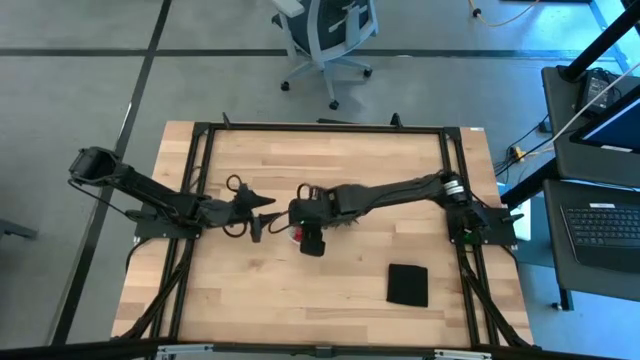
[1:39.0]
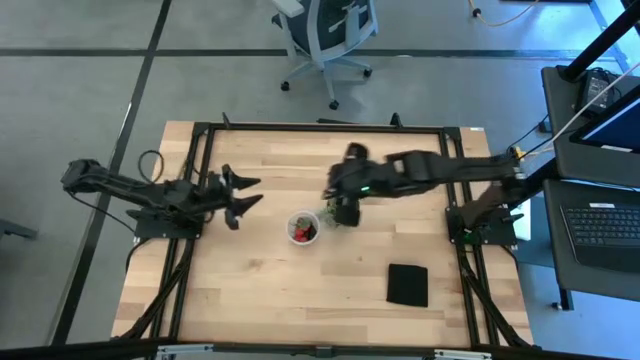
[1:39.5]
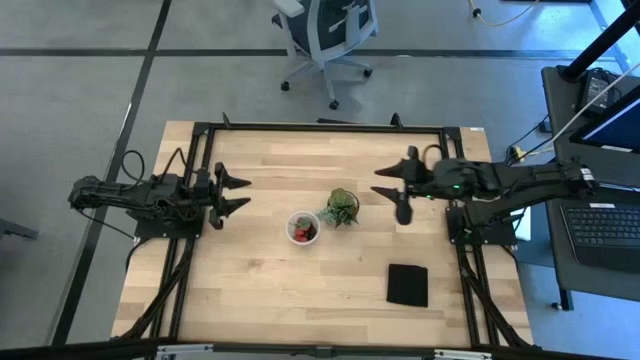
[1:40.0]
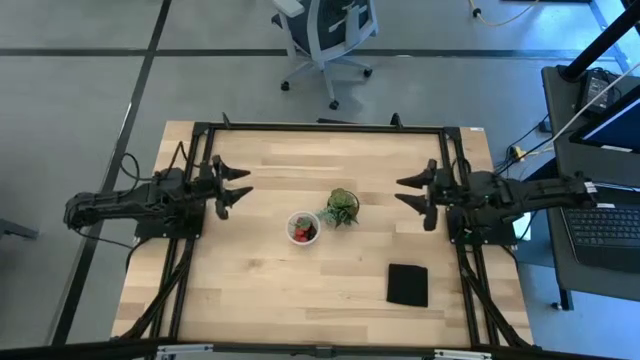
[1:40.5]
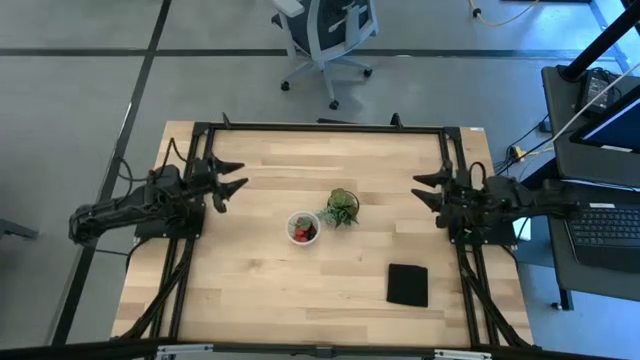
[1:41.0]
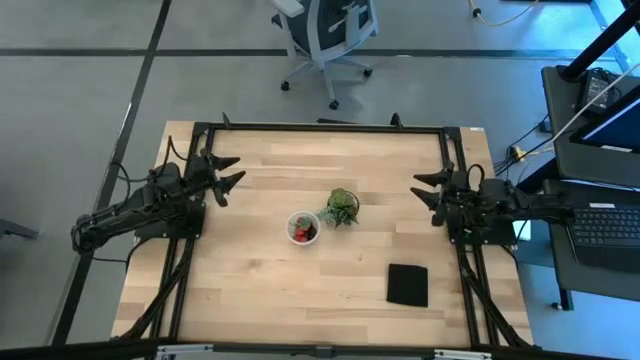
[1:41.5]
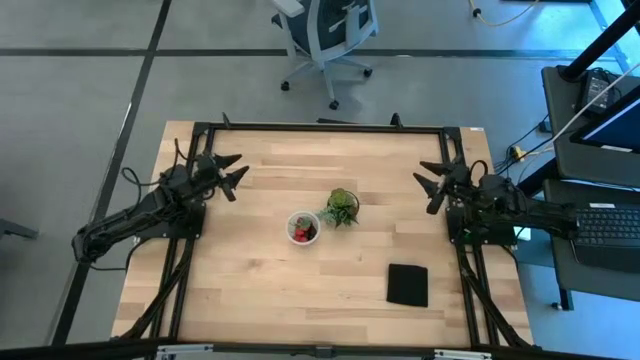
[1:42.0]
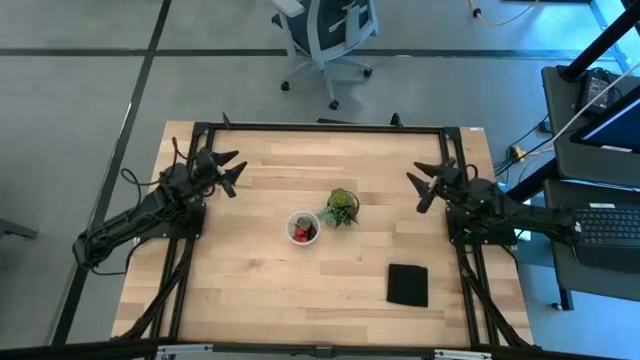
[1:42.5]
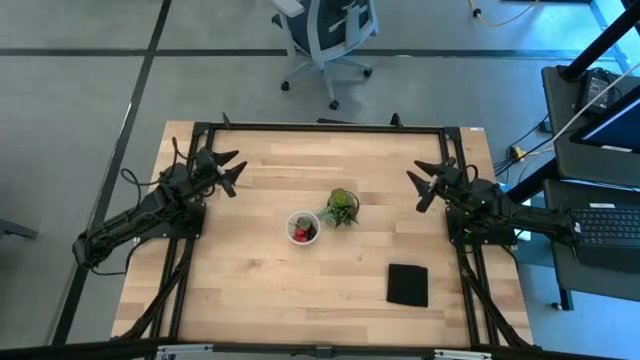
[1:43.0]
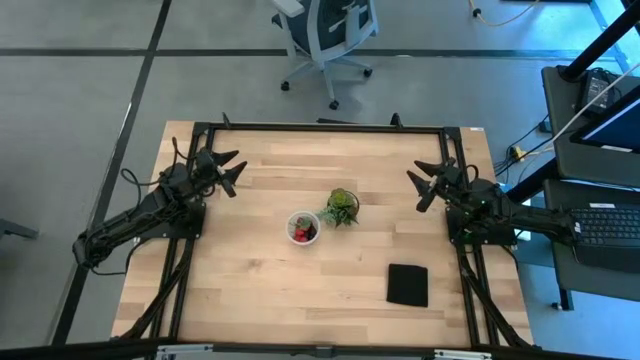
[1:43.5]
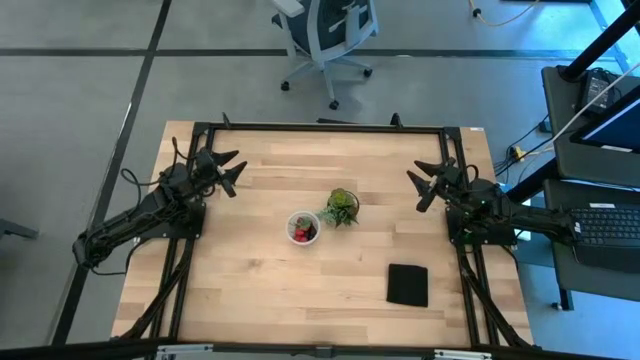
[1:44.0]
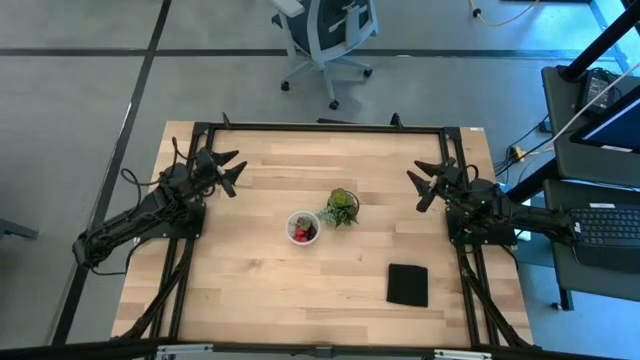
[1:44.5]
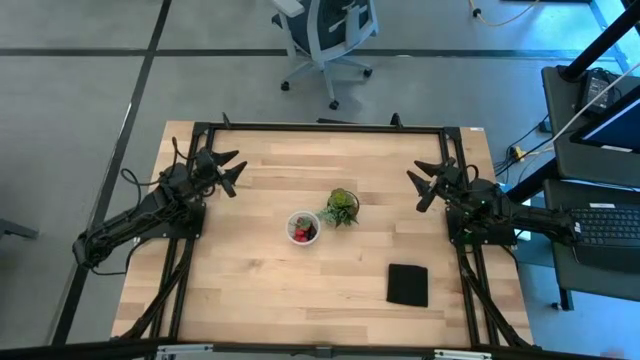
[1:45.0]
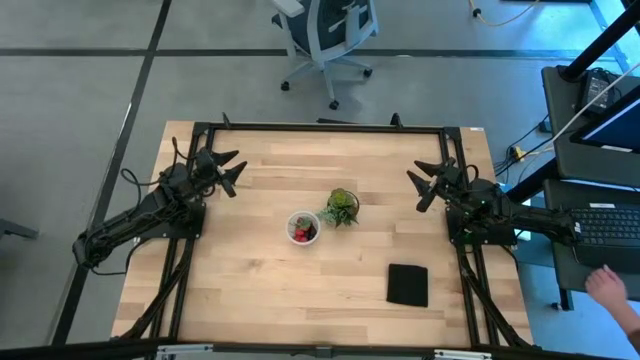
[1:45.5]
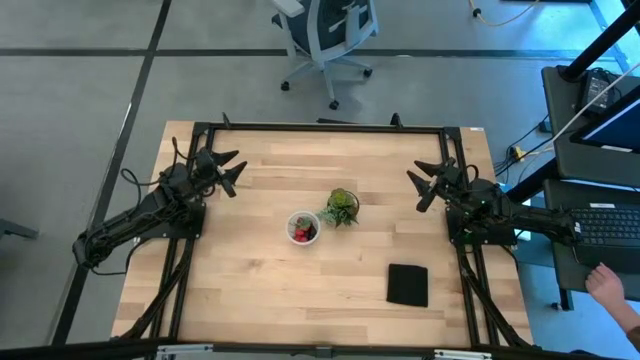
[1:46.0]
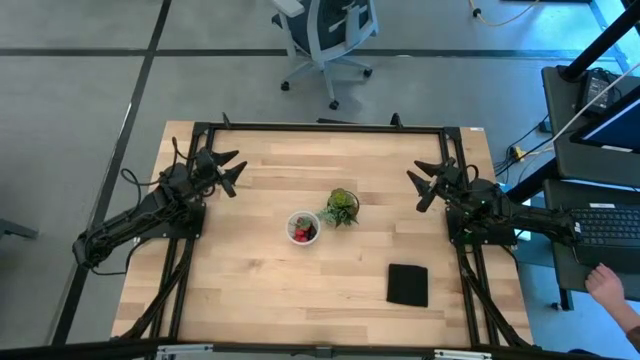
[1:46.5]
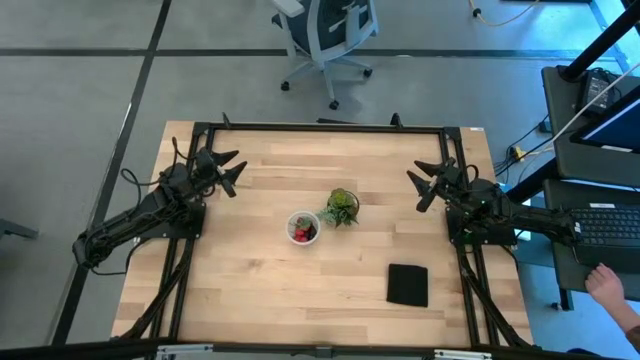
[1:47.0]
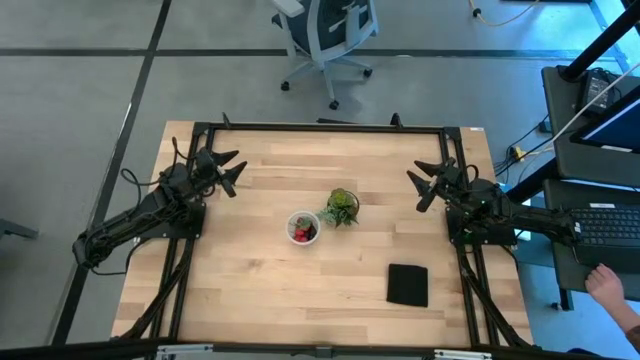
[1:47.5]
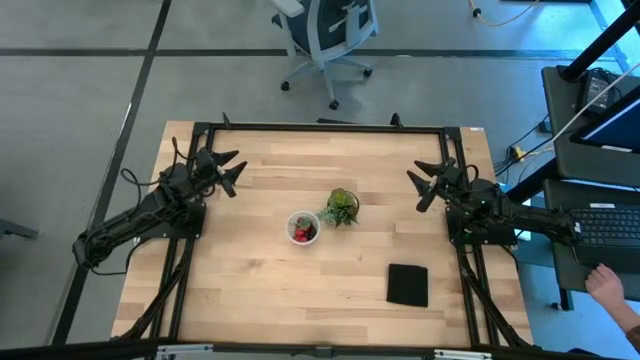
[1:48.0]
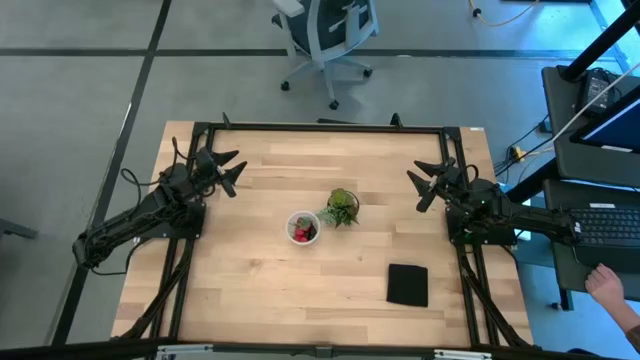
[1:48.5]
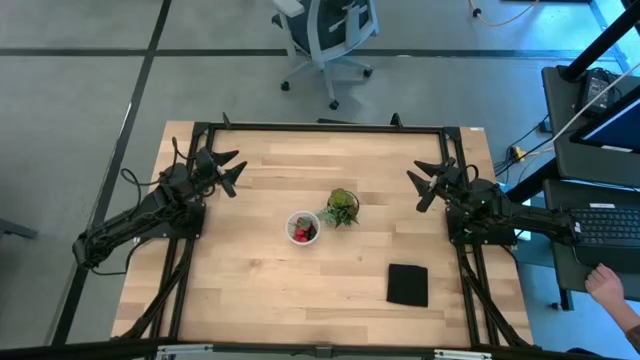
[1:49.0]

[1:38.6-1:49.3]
Task: Pick and placing Produce into tupperware
Return to Home Position

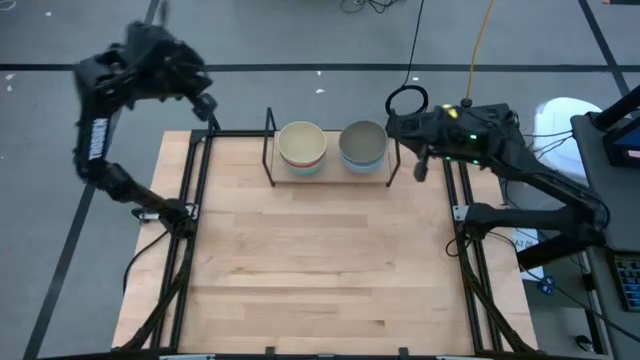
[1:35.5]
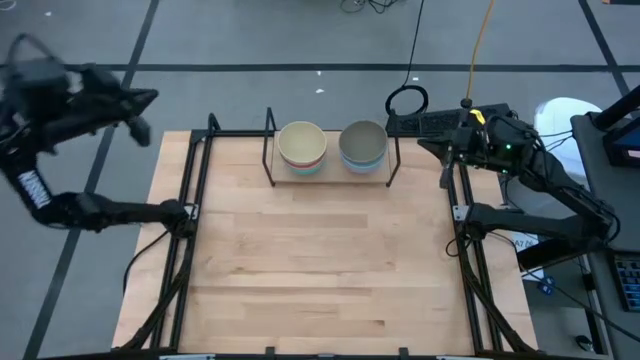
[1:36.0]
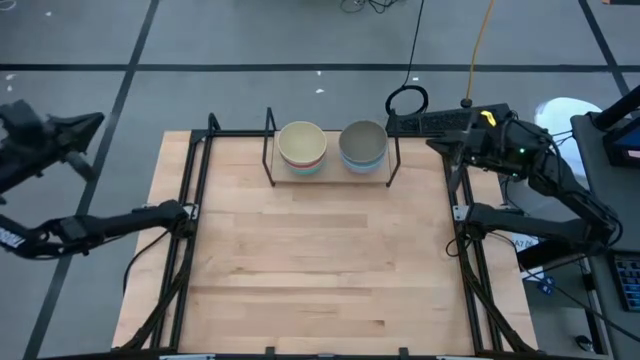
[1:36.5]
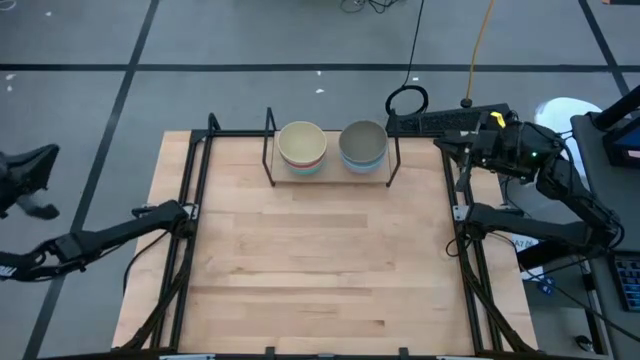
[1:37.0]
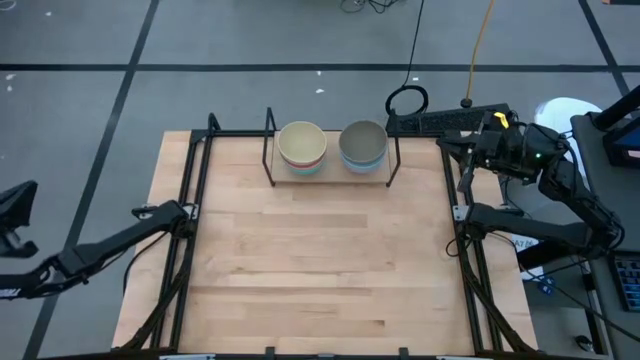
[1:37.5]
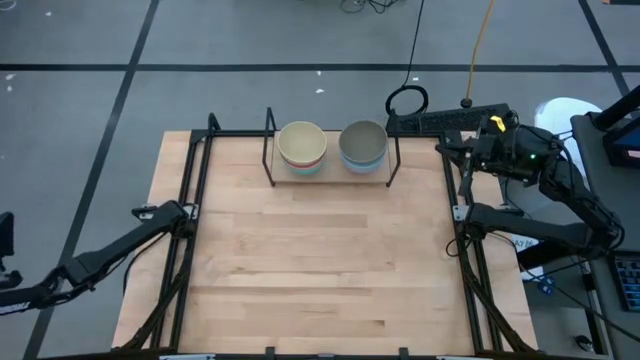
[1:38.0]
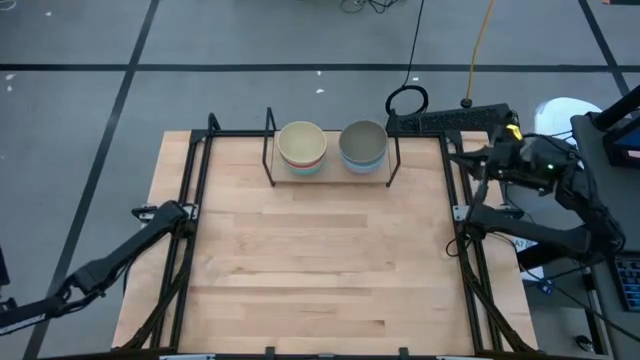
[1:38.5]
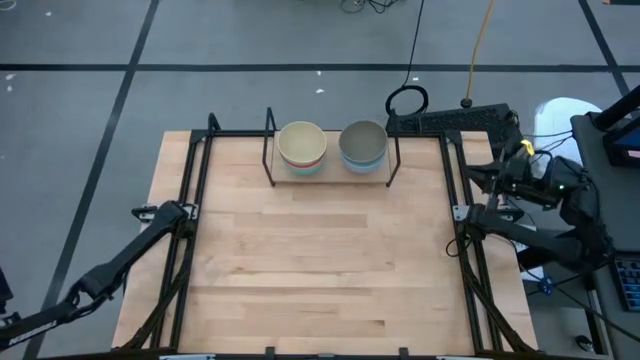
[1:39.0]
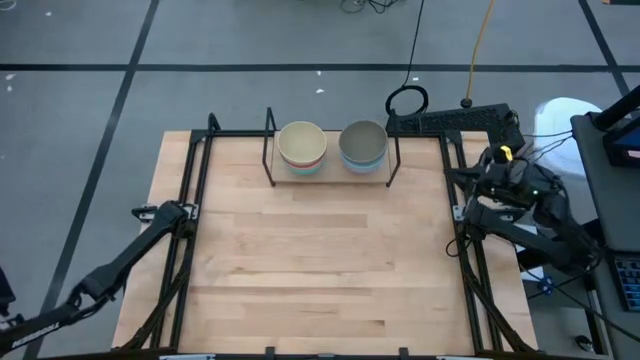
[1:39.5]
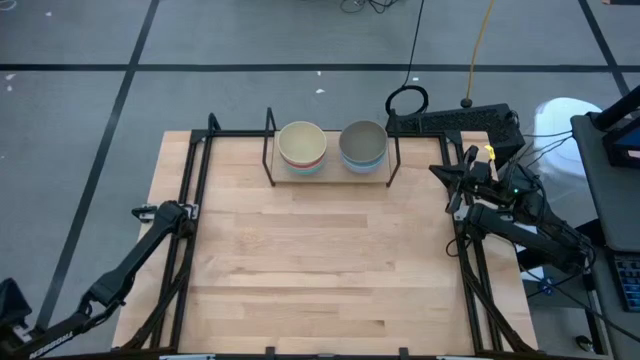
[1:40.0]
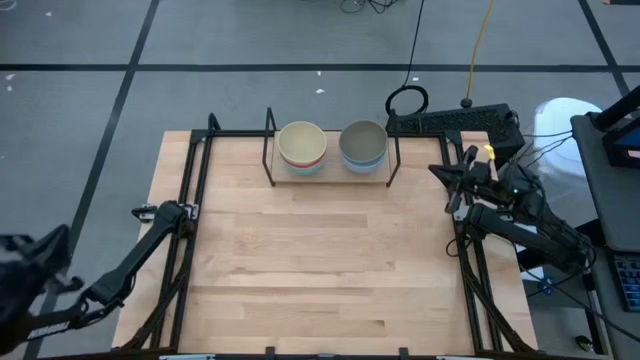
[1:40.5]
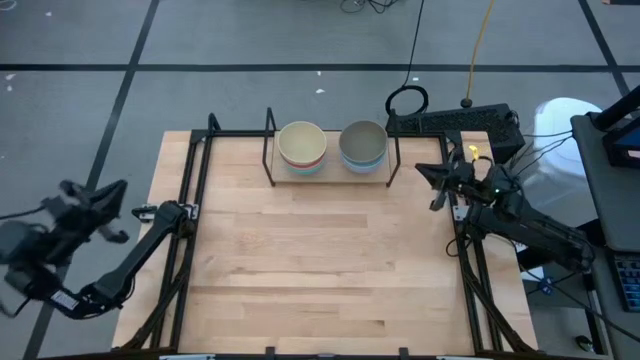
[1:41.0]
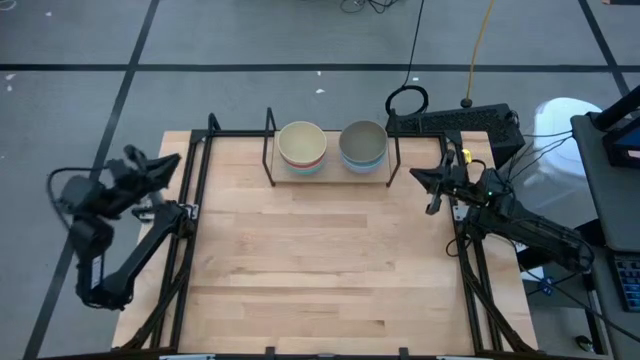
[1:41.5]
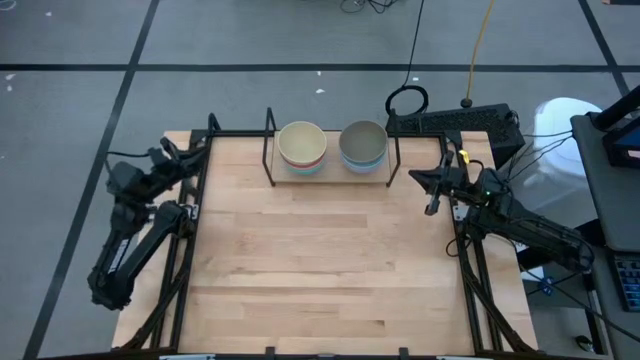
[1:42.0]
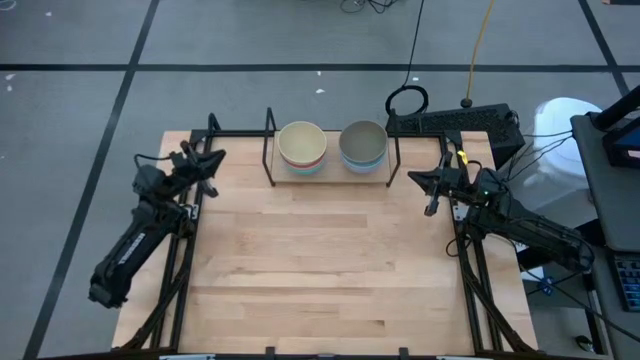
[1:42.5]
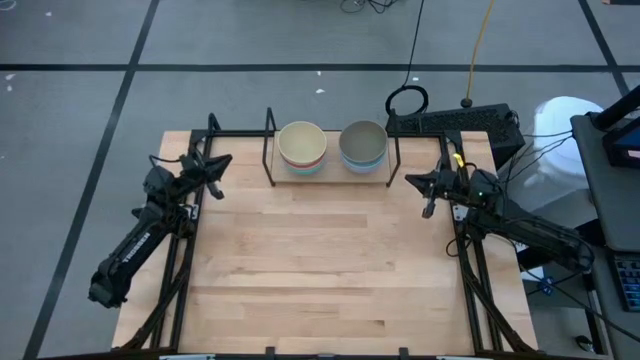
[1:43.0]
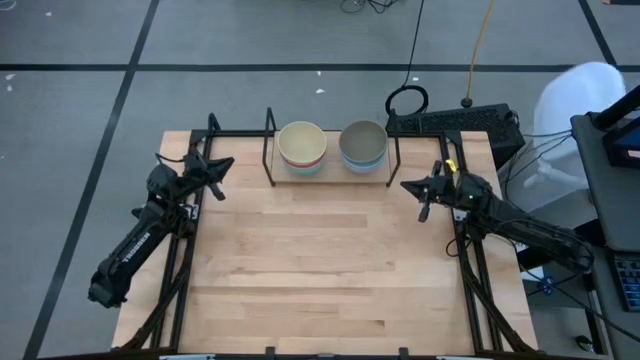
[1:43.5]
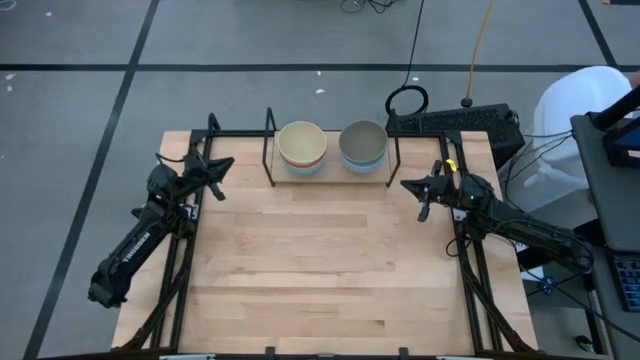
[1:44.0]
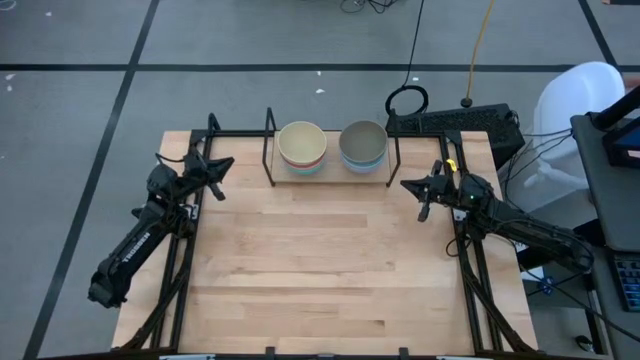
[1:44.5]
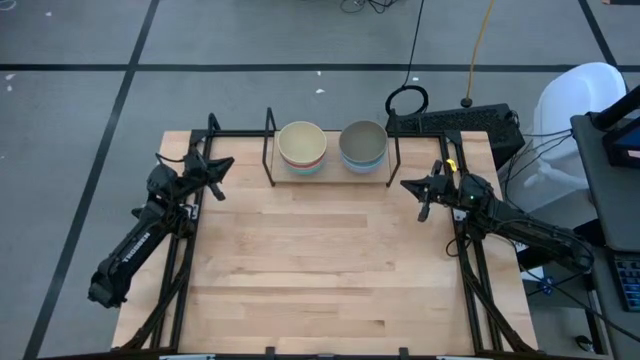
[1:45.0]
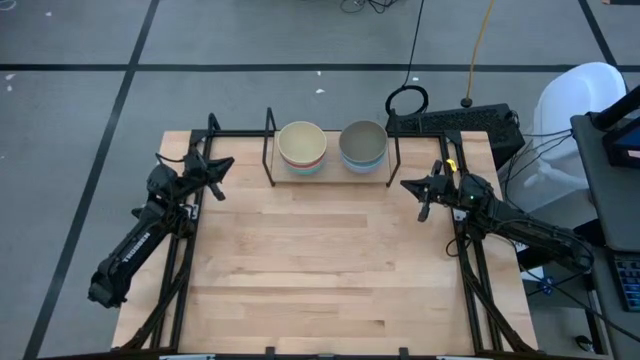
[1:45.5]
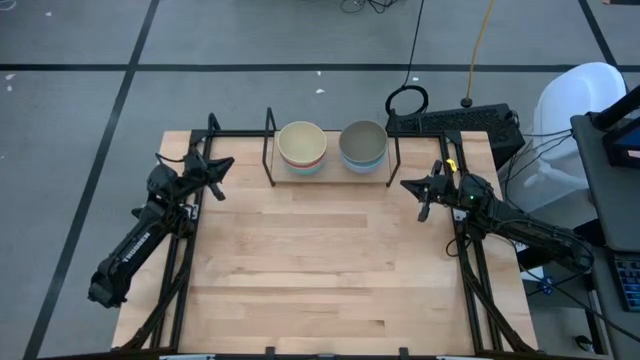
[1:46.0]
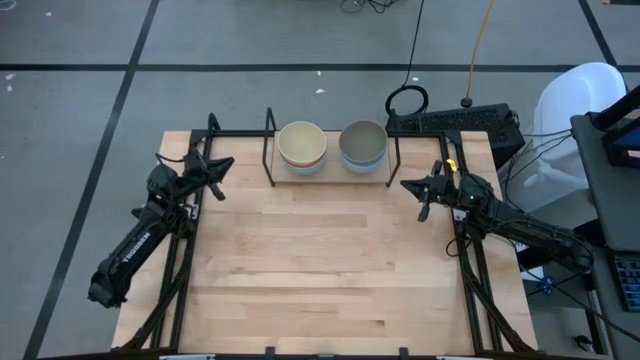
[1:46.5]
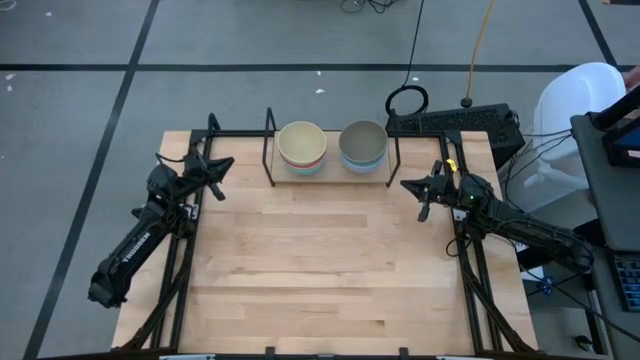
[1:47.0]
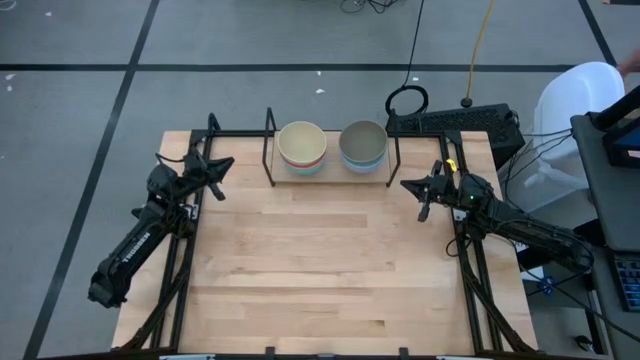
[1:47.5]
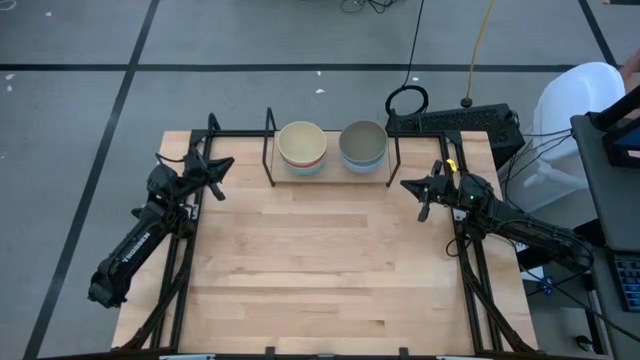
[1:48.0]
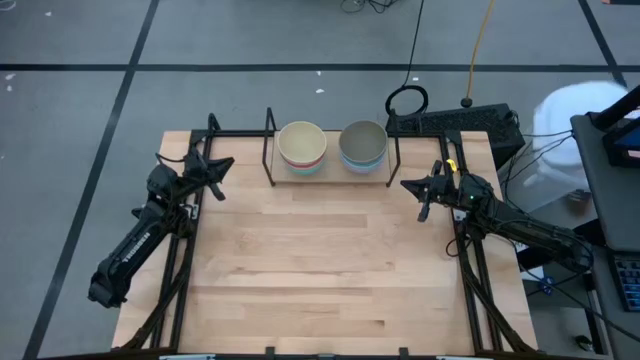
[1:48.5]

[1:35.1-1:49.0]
Task: Place and stack bowls onto a shelf
Return to Home Position
